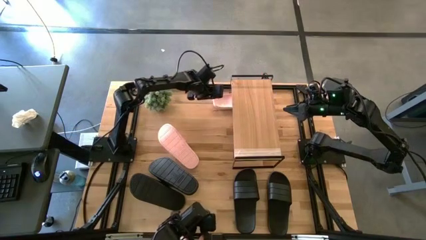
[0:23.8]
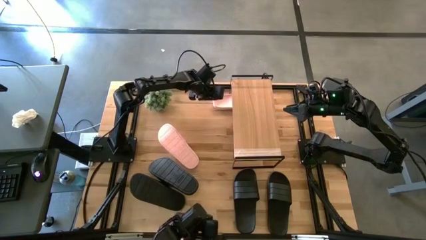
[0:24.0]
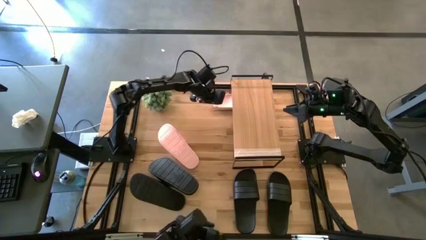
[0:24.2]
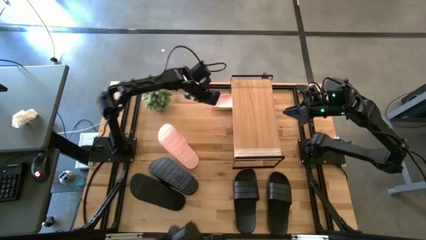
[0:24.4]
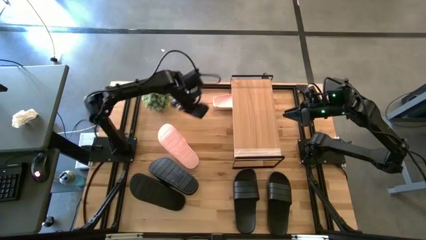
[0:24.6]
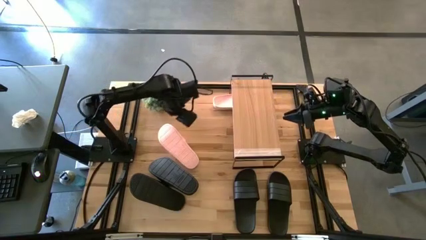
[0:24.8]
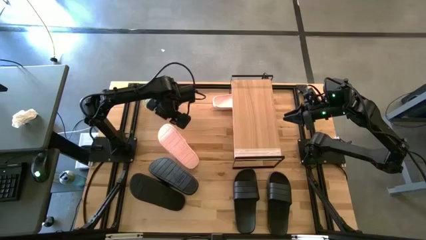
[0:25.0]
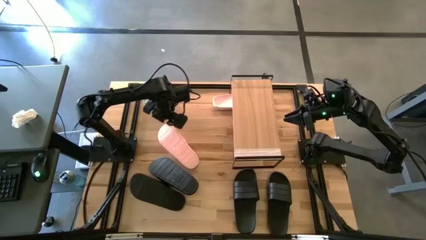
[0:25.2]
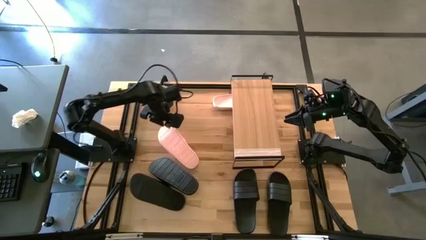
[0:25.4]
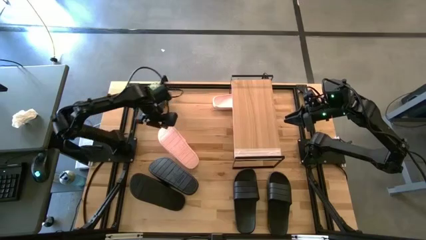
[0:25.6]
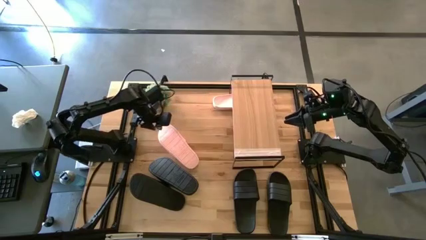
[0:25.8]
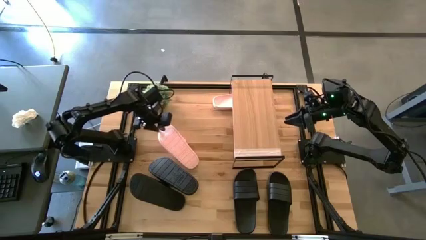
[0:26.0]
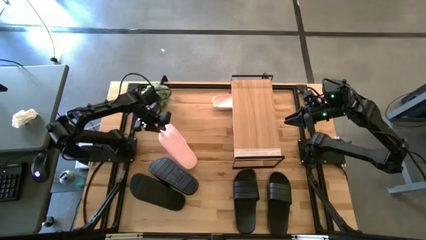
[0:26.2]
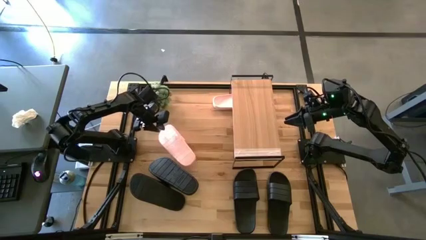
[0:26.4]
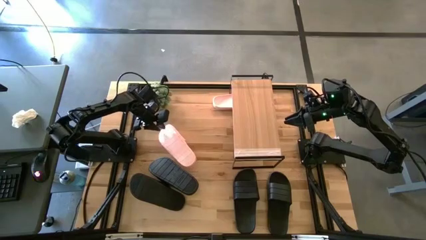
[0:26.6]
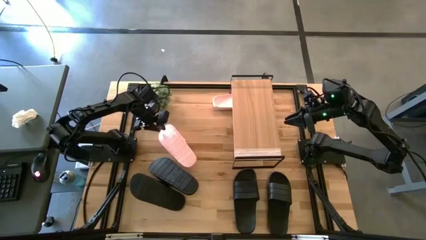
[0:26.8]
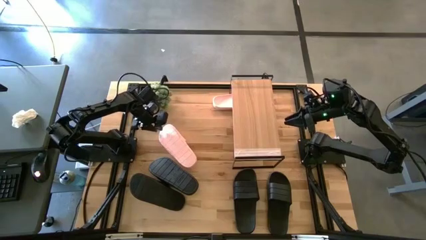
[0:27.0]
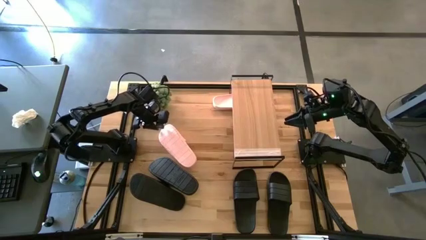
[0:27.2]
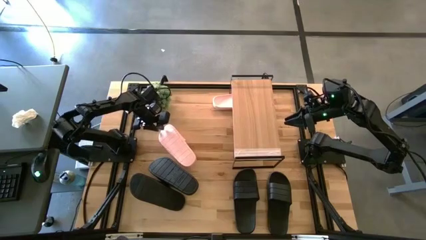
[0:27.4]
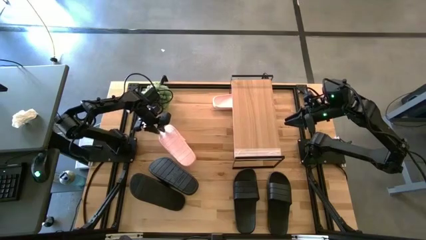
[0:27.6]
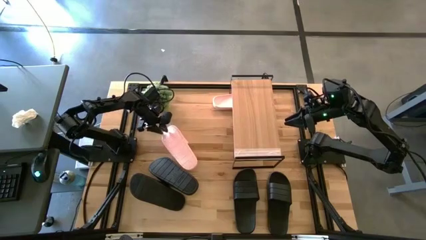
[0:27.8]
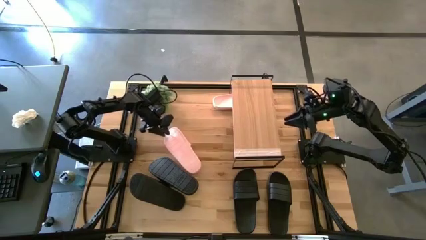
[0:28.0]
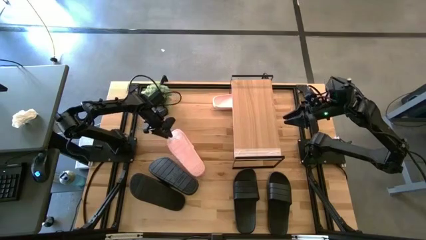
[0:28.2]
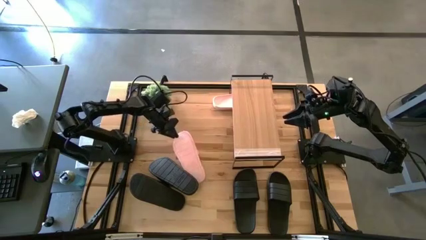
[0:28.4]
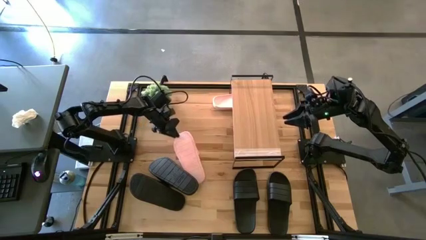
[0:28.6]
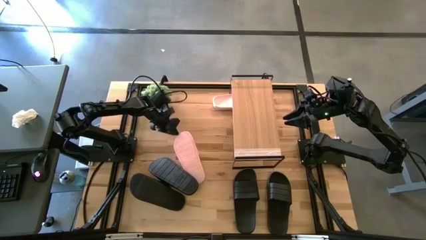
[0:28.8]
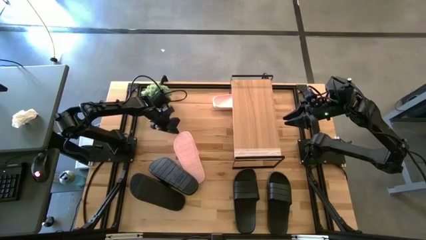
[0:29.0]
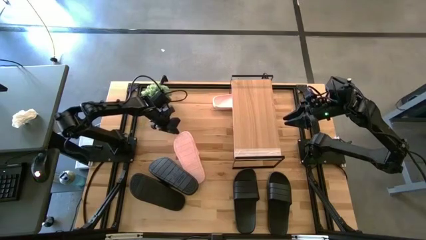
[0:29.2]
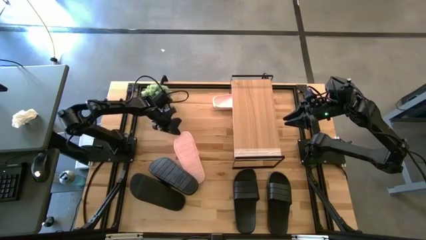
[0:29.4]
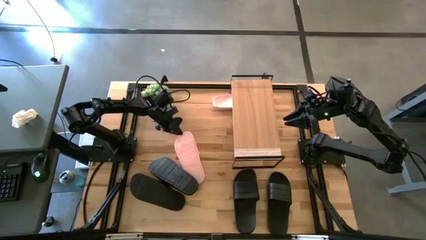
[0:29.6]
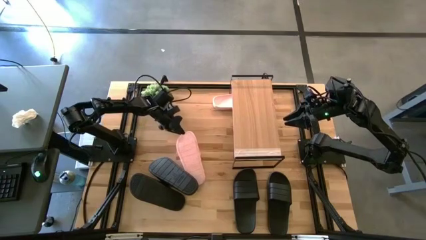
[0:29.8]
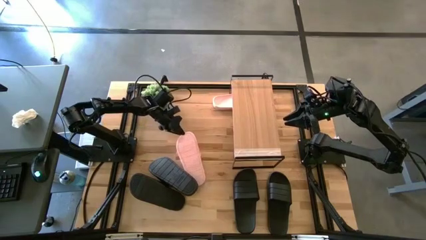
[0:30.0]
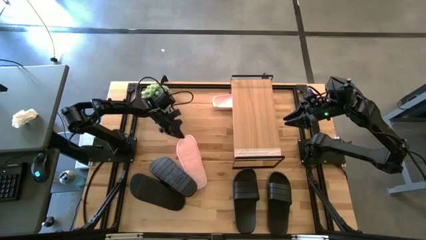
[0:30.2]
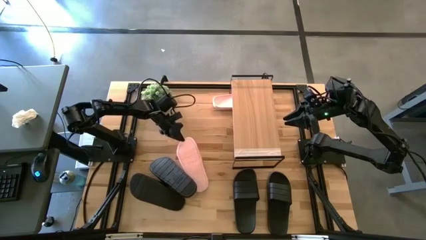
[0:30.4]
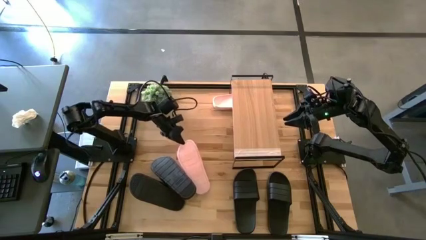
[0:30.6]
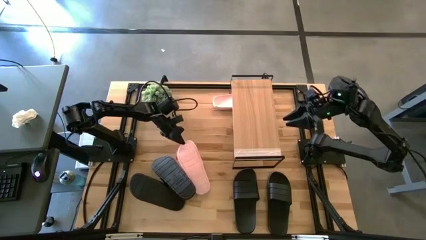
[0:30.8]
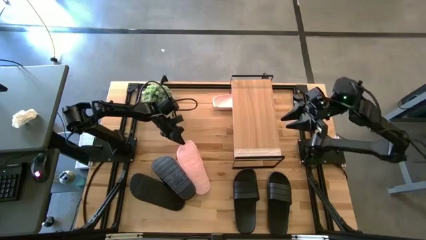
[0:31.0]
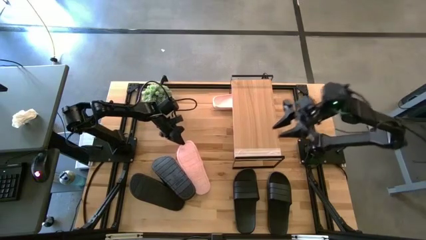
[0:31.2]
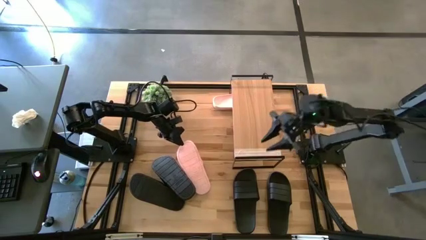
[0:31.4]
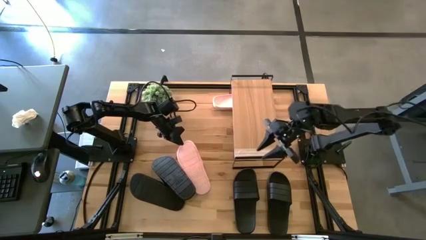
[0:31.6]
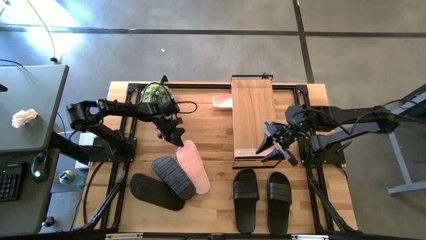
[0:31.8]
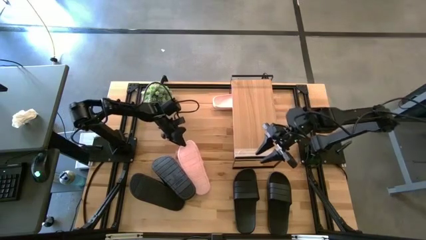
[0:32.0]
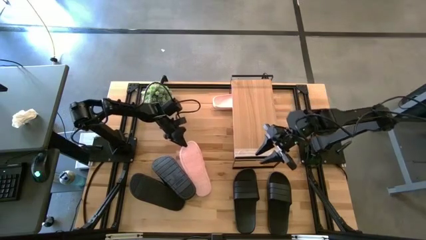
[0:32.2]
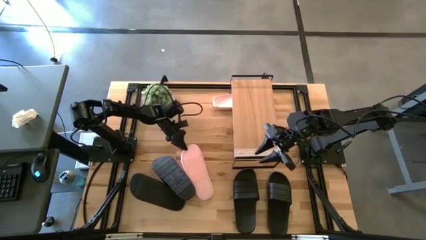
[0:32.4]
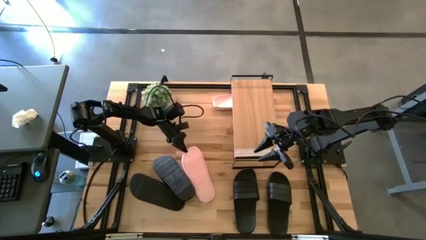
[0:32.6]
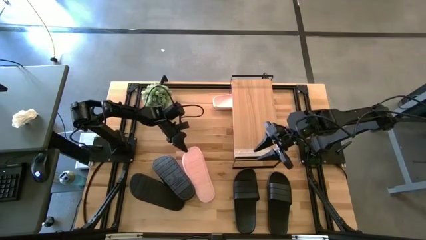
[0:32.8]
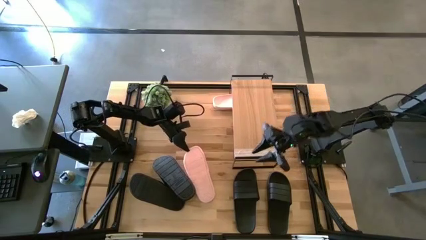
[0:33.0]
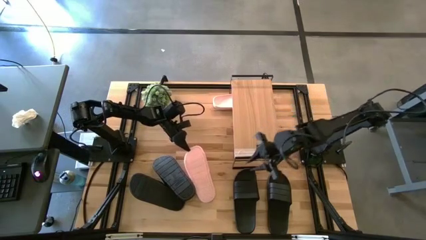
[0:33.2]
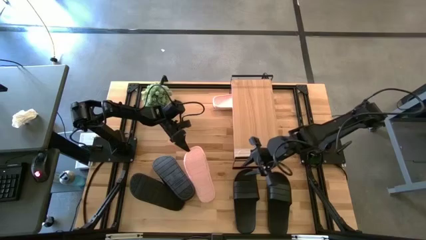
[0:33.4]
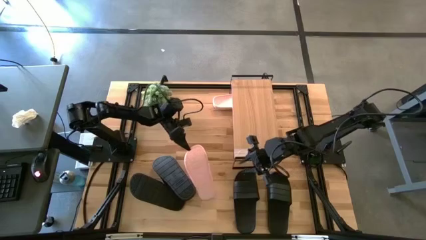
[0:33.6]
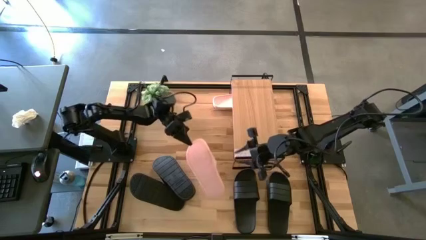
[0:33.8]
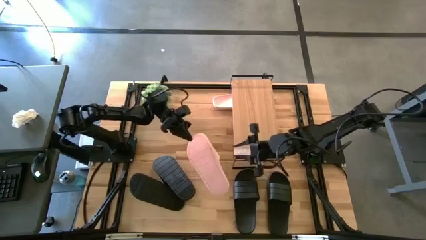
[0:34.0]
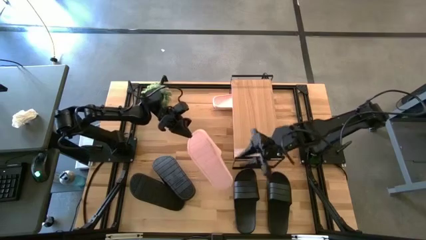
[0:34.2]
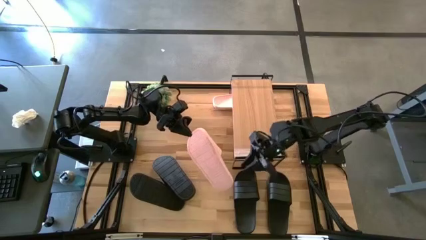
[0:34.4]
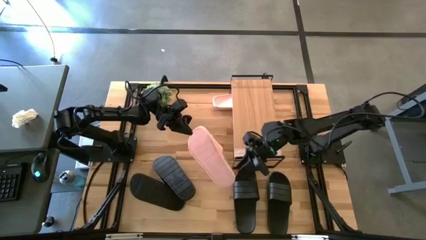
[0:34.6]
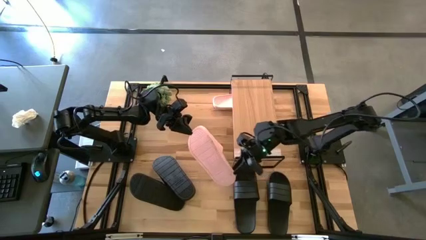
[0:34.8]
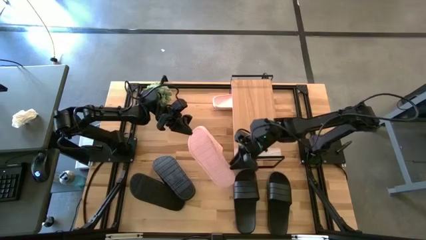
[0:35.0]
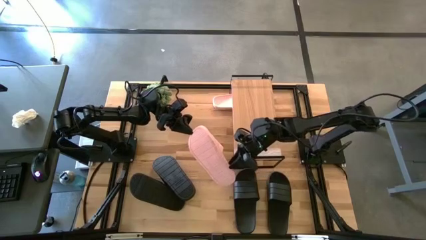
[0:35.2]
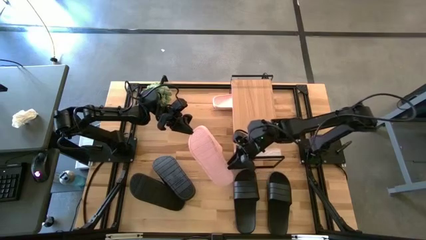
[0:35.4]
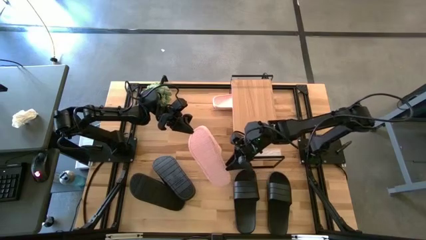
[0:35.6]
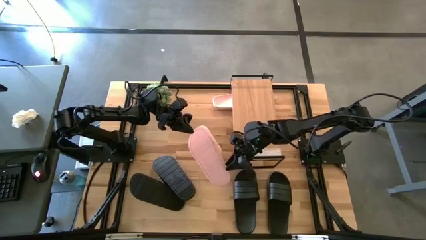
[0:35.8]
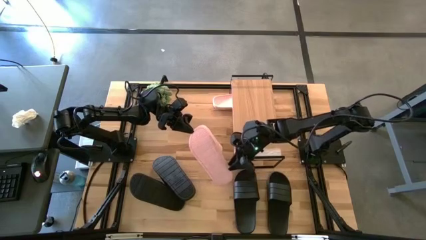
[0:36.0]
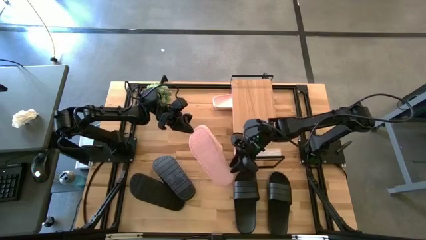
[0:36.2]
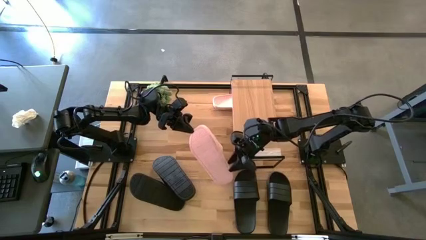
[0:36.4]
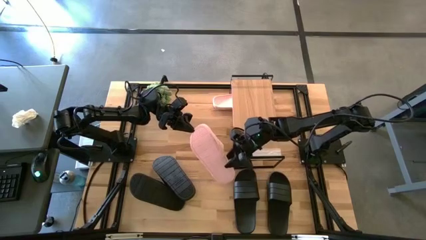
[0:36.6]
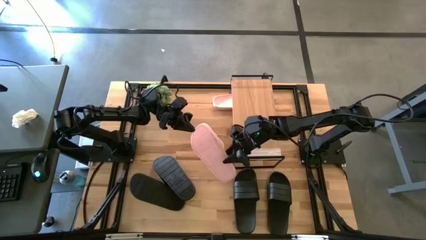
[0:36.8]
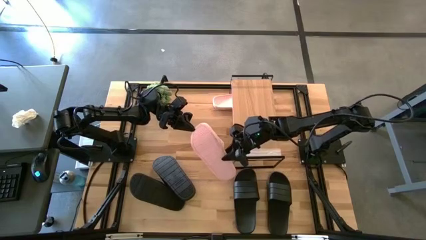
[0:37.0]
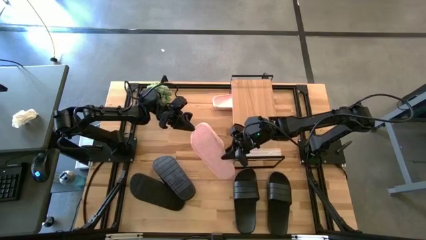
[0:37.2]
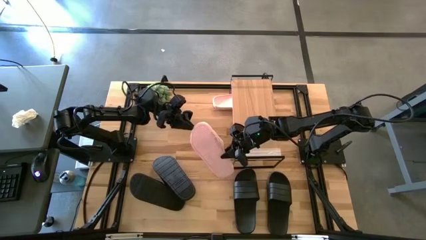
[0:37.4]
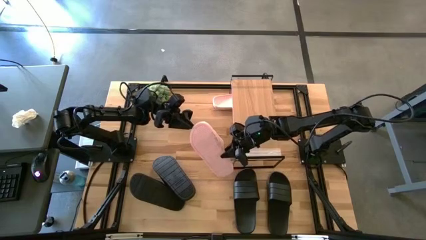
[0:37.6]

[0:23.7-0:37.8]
Task: Pick and place slides into the shelf
Put the pink slipper under the shelf
